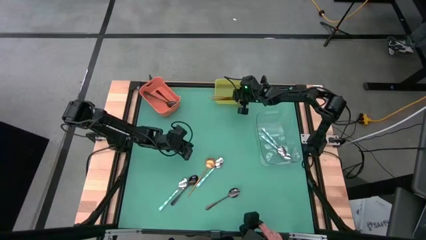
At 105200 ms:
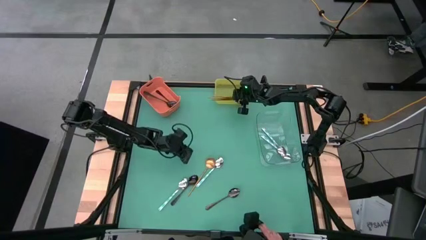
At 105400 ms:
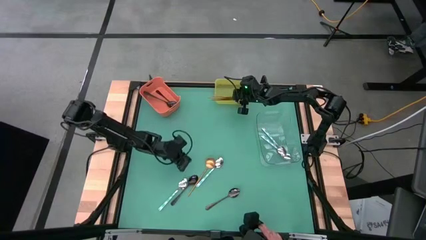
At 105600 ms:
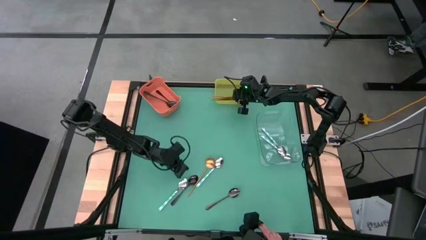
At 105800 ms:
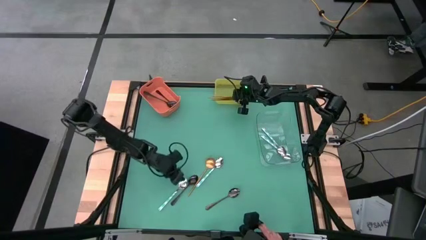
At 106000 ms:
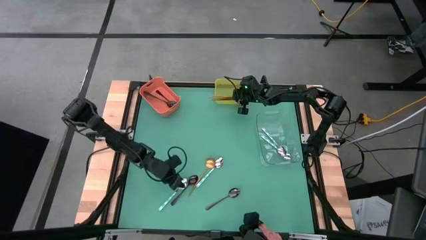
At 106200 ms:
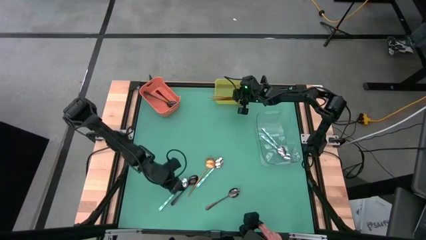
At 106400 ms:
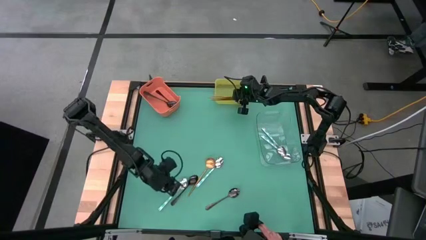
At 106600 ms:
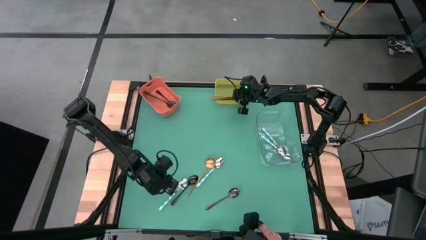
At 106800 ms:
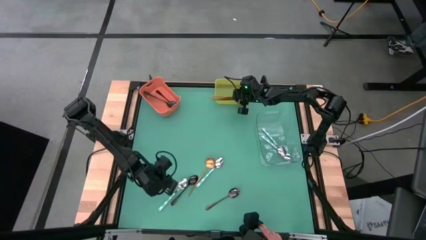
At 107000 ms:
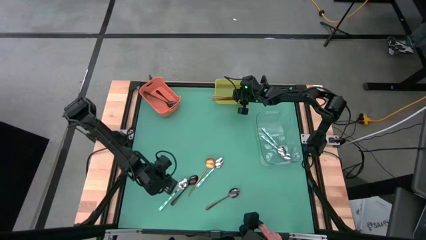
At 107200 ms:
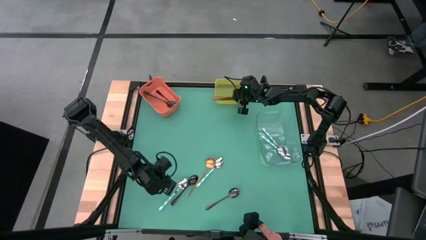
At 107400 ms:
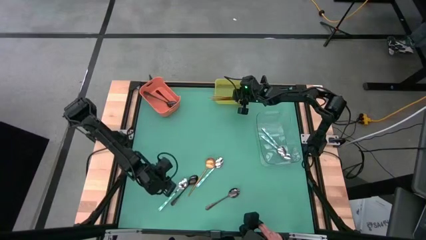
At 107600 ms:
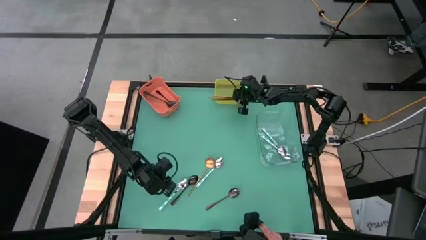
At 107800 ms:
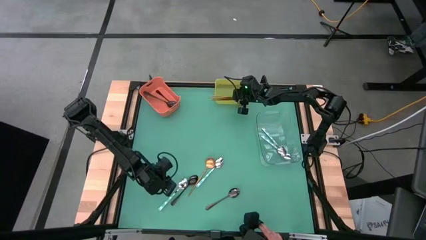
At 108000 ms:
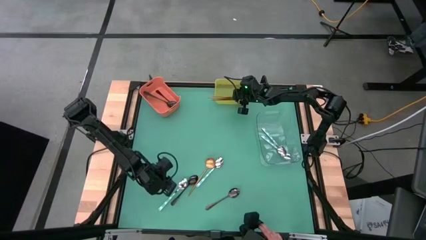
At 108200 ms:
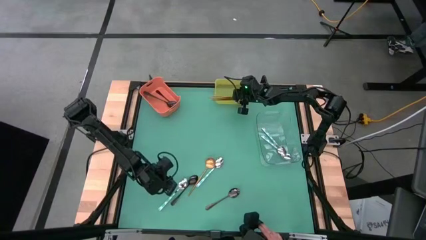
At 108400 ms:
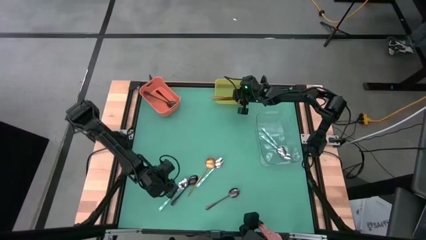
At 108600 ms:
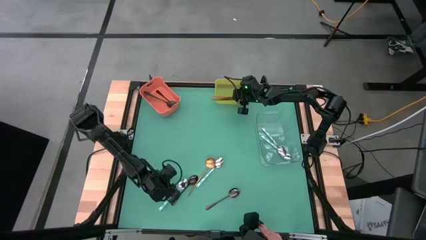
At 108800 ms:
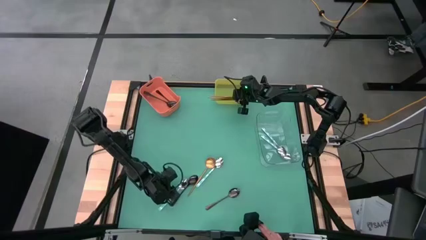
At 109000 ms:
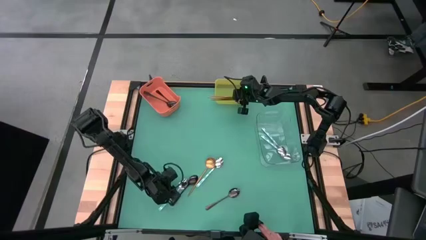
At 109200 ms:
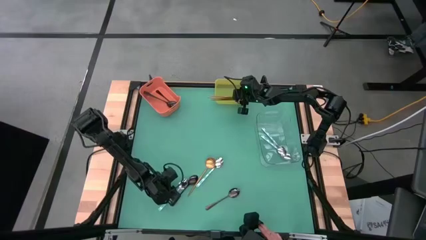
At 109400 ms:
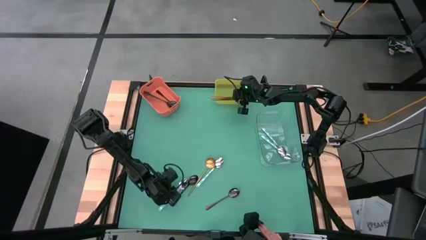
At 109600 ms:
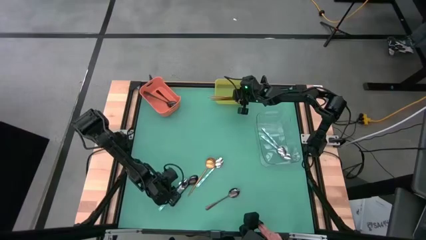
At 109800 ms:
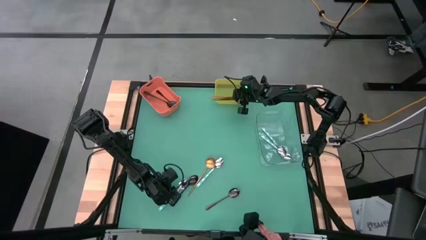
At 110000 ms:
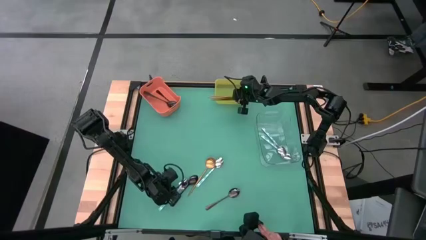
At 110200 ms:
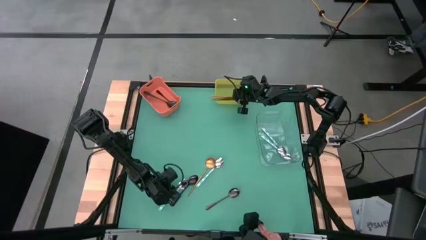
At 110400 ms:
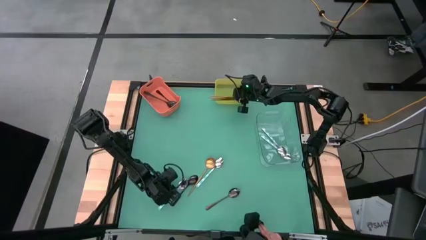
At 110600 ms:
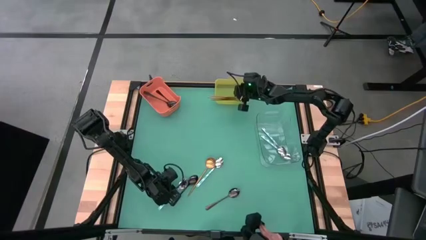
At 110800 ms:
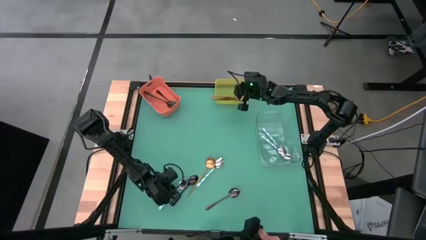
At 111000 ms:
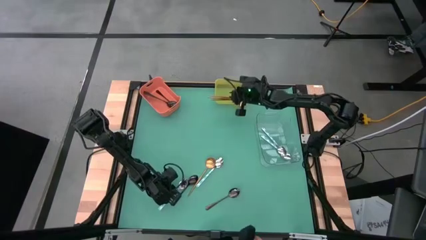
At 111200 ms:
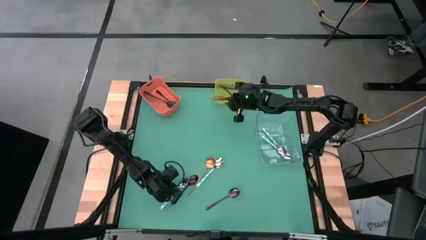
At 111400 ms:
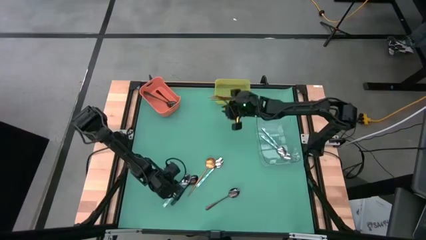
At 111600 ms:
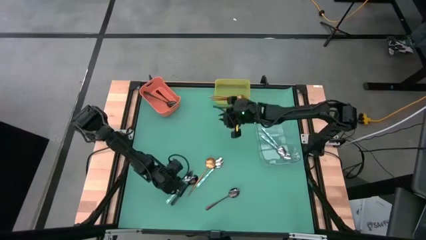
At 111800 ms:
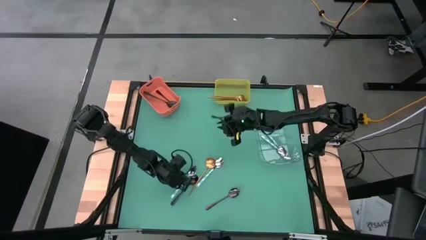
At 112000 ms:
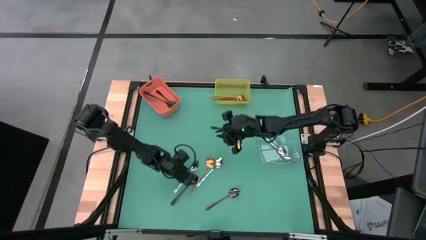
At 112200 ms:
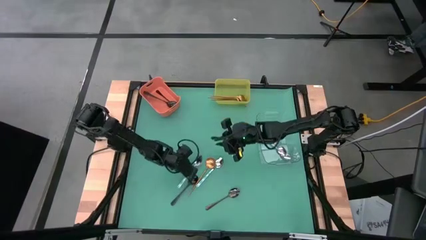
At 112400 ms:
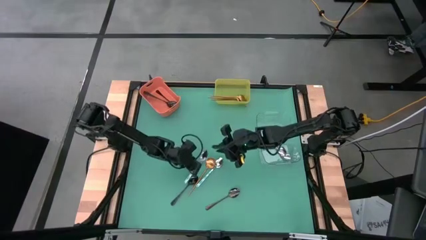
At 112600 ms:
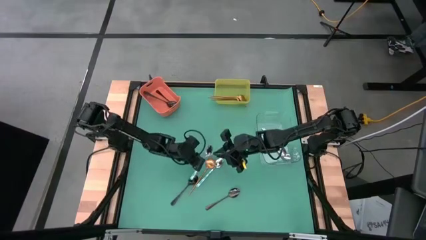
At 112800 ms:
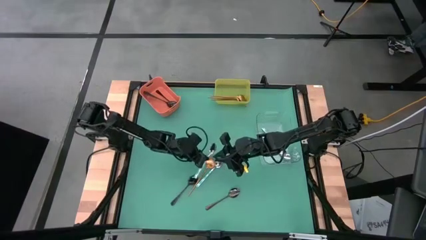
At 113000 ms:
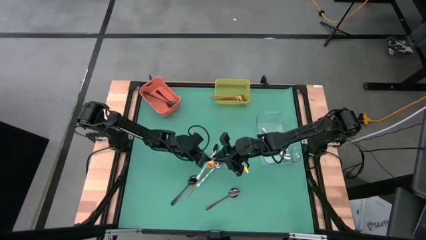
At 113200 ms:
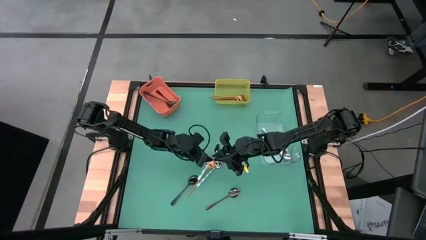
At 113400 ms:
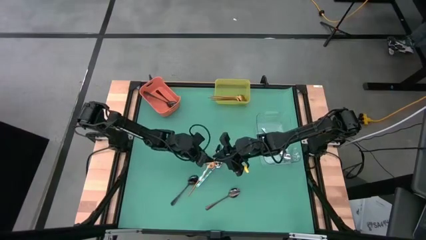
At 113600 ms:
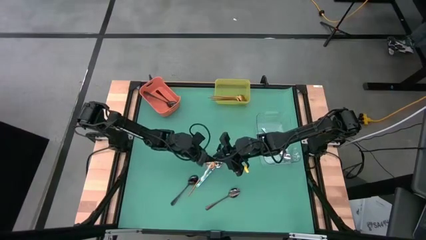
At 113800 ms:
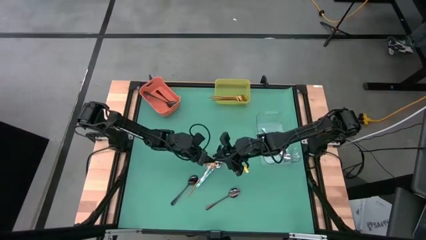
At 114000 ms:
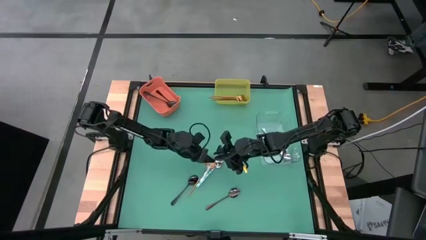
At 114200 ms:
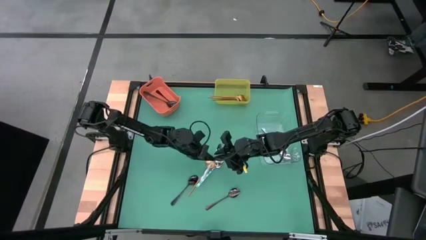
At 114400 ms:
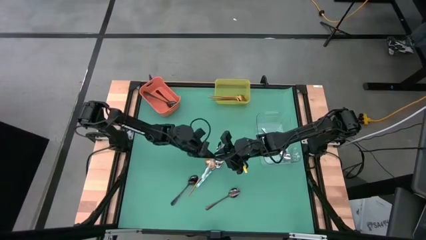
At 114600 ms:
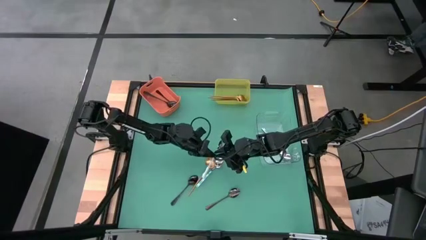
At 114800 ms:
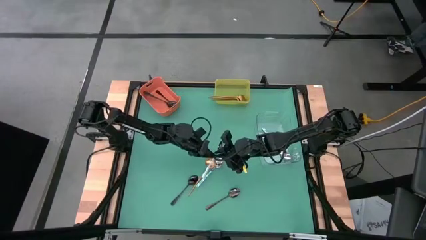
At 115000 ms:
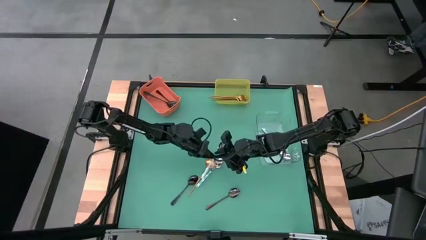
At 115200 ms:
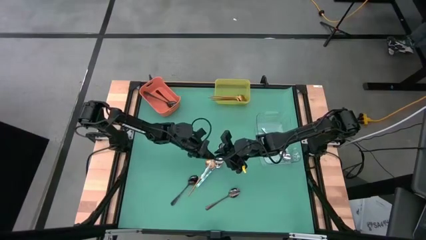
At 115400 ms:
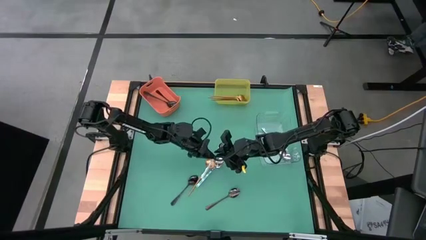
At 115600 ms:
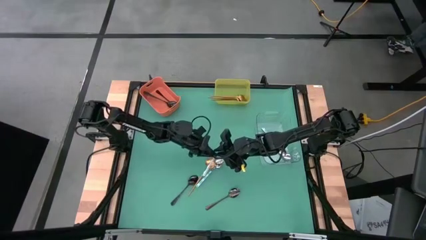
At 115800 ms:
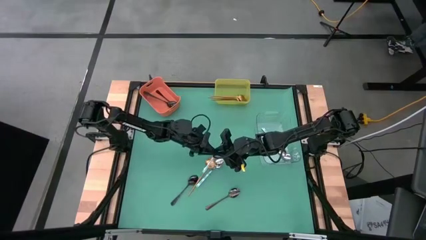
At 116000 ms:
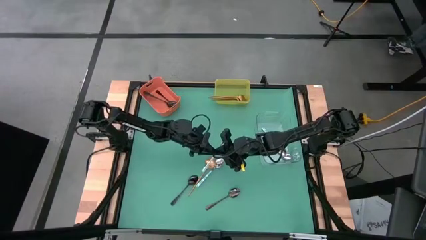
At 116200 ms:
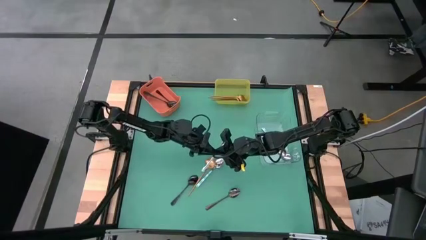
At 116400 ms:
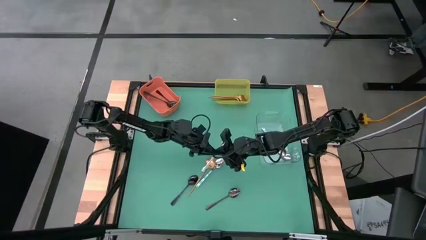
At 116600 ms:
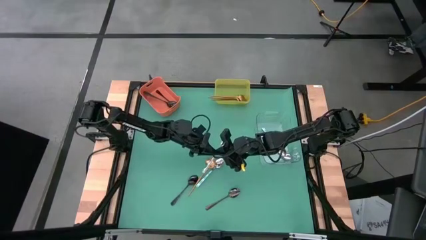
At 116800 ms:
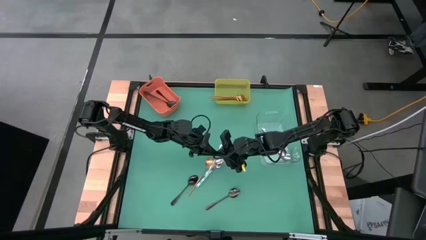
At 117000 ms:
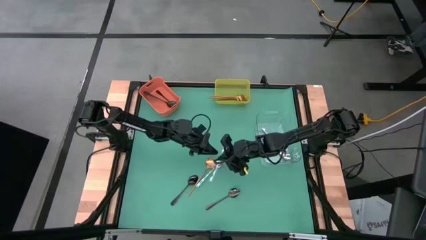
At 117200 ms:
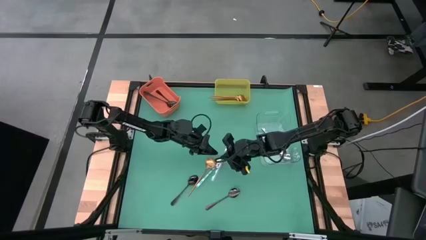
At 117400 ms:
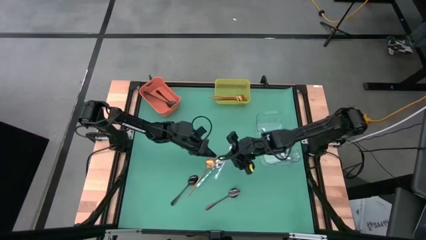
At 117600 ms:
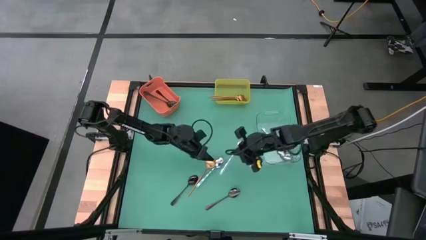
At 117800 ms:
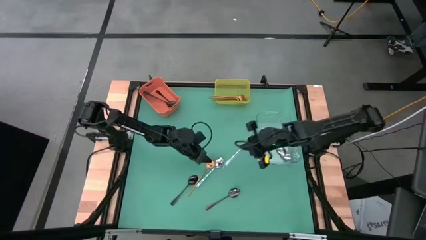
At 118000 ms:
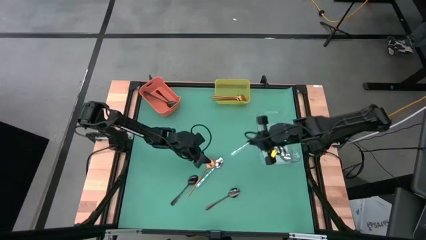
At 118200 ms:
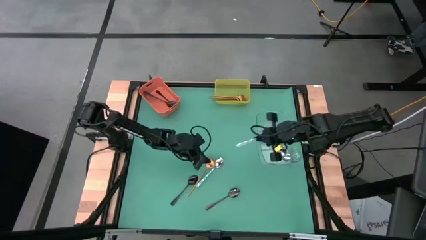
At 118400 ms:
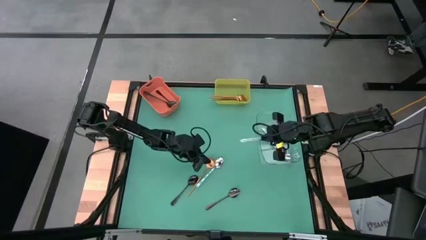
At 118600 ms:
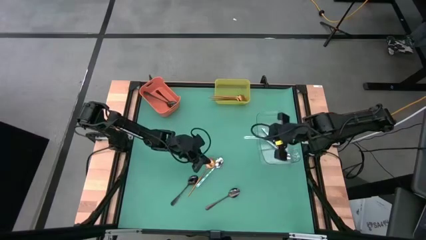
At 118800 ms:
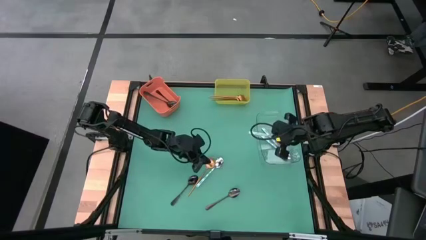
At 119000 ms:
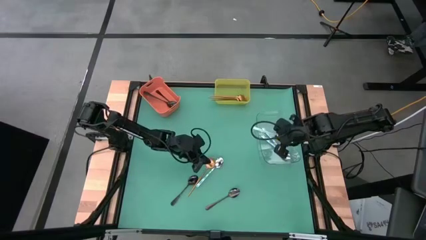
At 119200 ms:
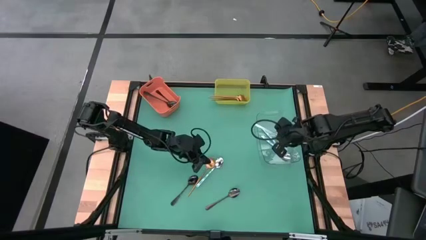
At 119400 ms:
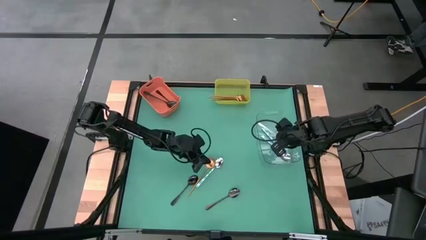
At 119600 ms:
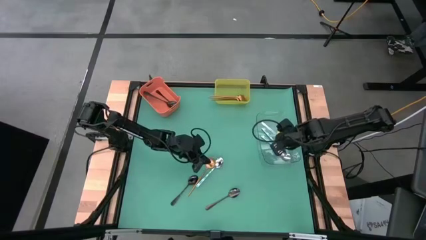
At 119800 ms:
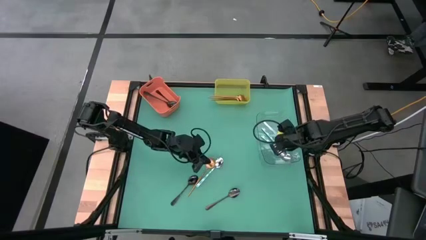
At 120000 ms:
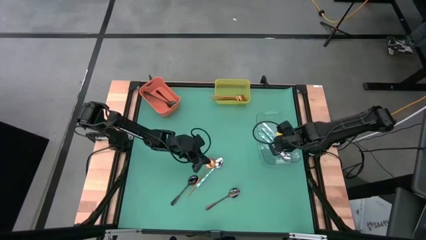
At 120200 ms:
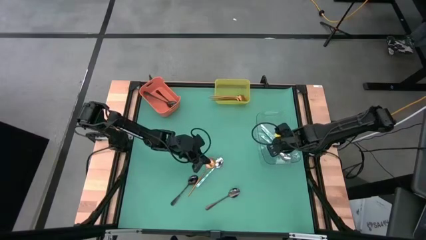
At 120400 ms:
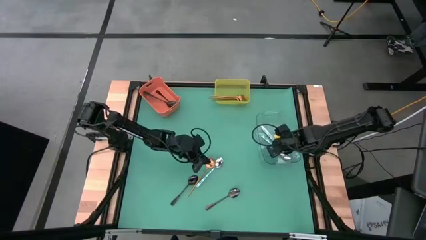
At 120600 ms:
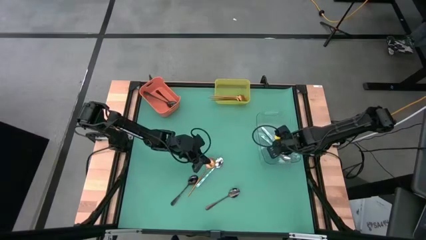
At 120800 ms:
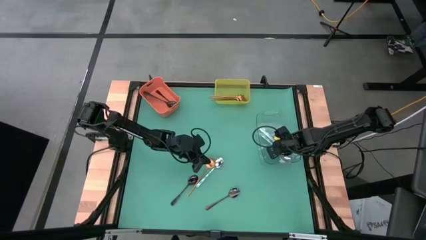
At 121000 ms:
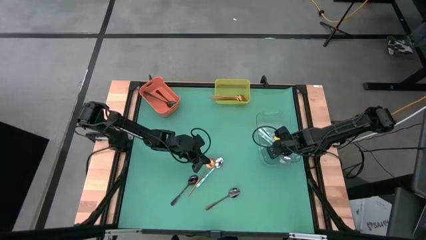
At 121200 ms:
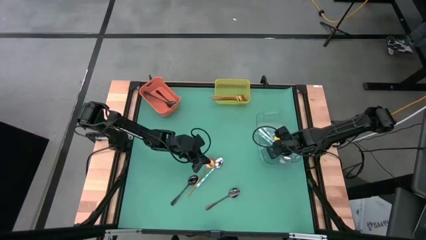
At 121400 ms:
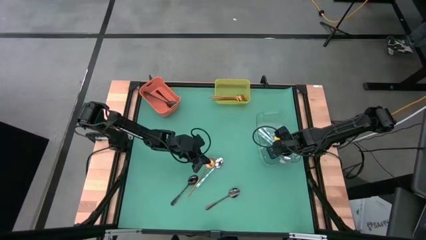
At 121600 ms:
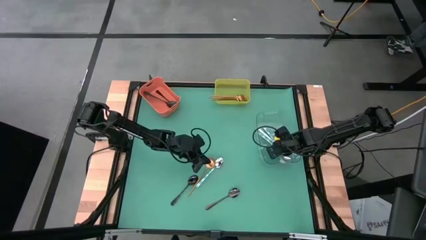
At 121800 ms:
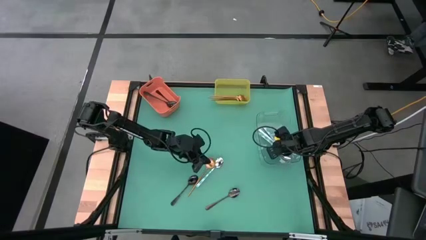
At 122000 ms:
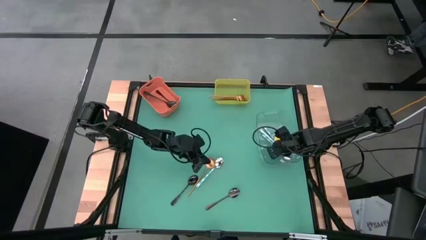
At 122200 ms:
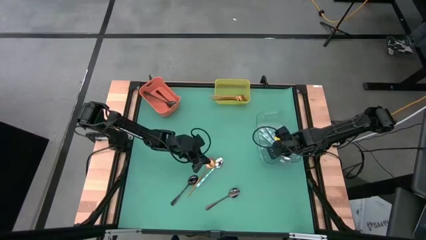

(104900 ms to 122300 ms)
Task: Sort silverware by color (type)
Put the white patterned spoon into the transparent bin

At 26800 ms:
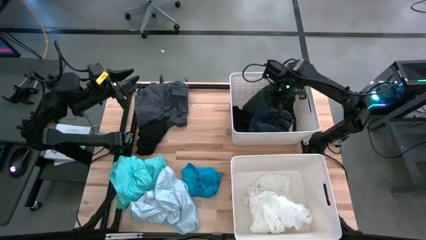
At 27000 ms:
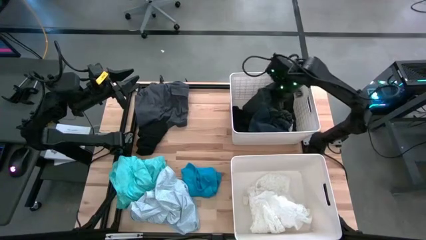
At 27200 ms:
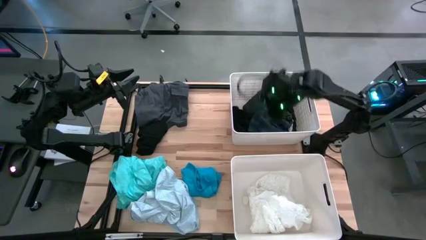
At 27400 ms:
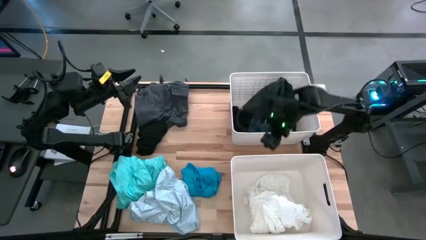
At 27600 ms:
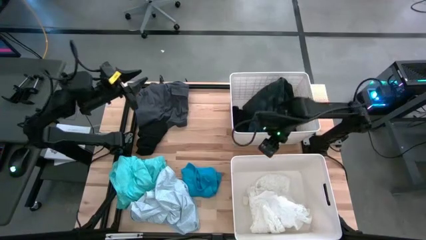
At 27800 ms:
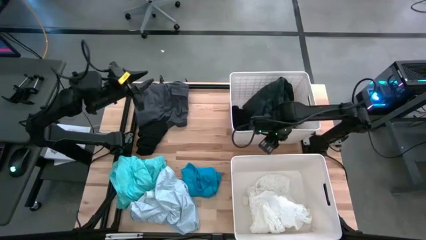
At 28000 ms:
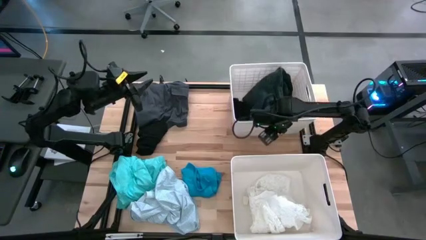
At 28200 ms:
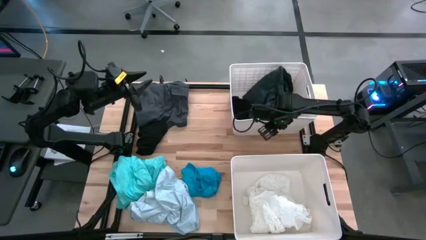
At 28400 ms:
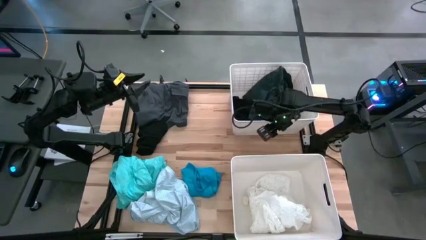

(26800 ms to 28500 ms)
Task: Sort clothes
Adjust the top white laundry bin
